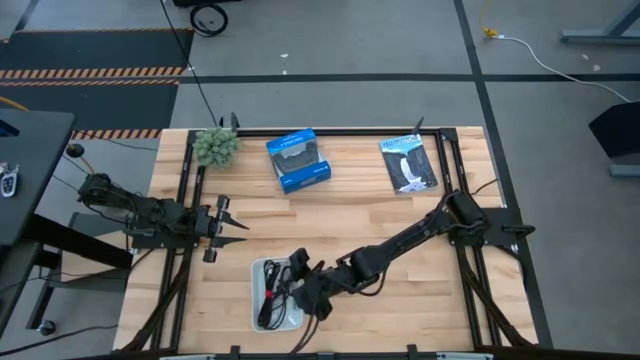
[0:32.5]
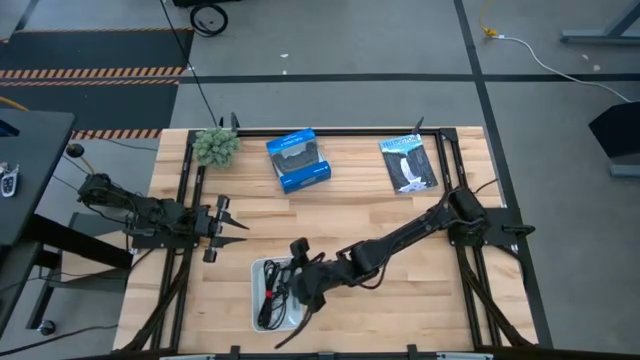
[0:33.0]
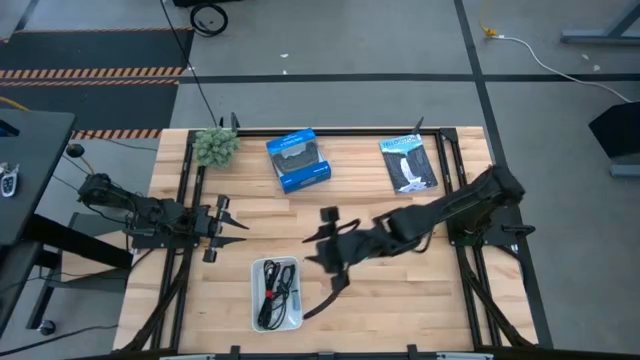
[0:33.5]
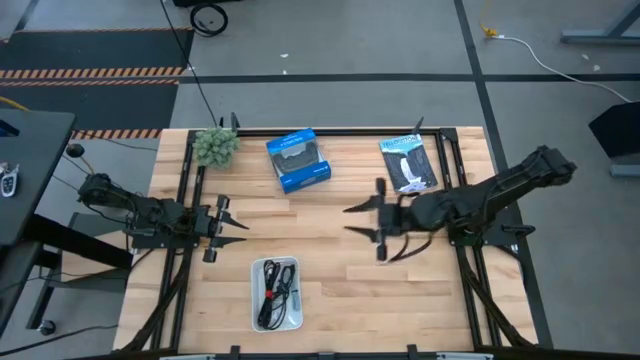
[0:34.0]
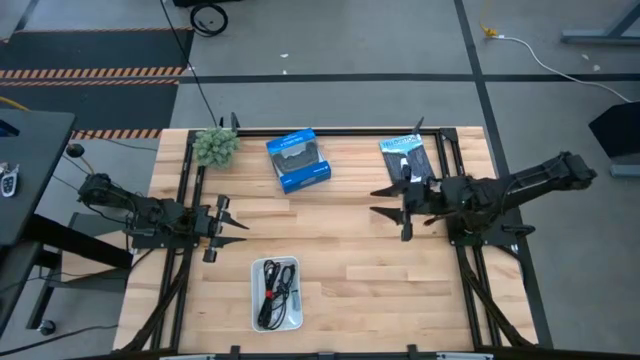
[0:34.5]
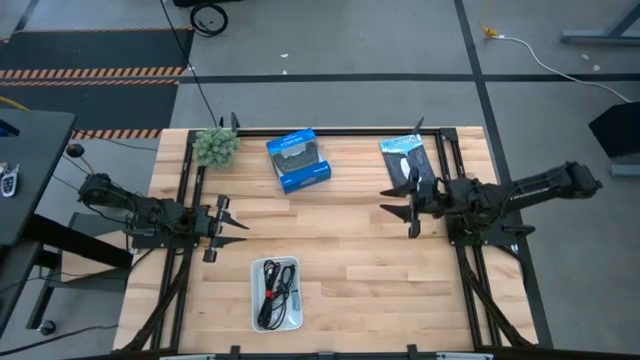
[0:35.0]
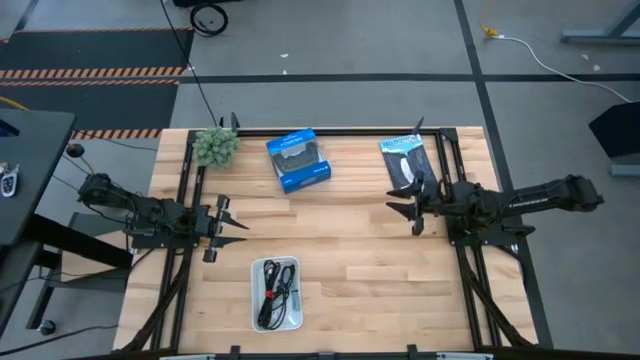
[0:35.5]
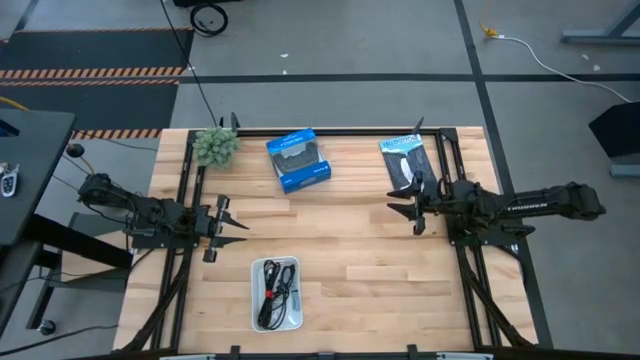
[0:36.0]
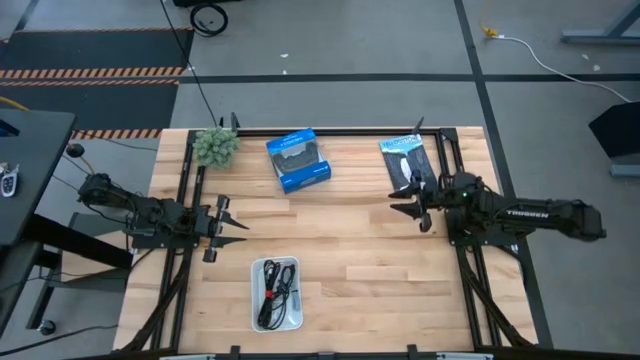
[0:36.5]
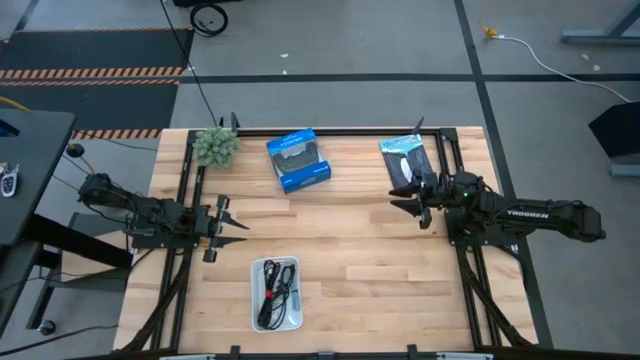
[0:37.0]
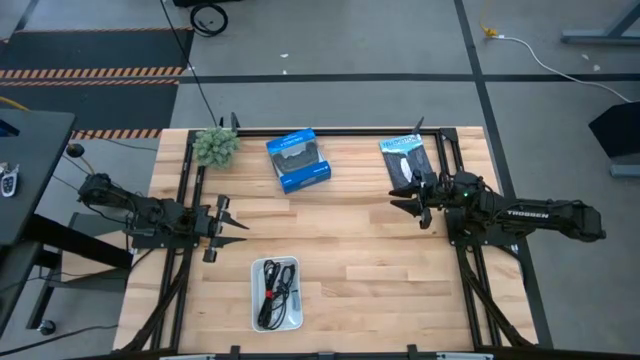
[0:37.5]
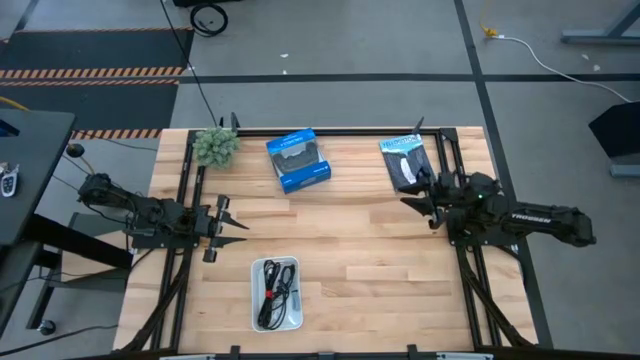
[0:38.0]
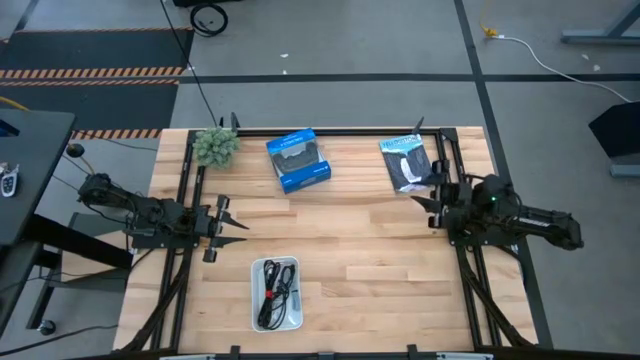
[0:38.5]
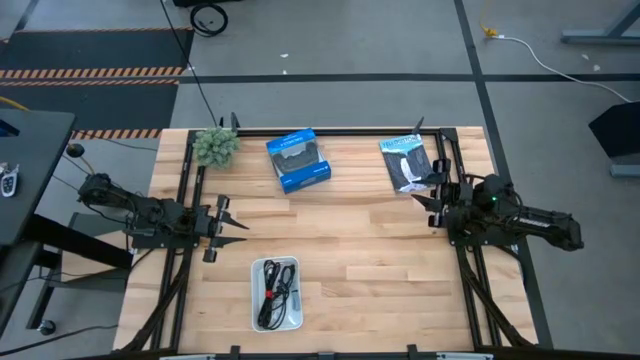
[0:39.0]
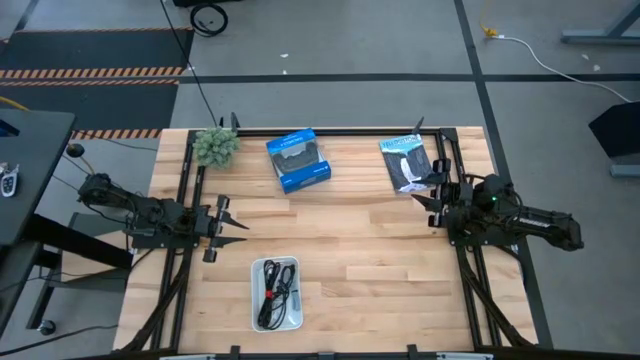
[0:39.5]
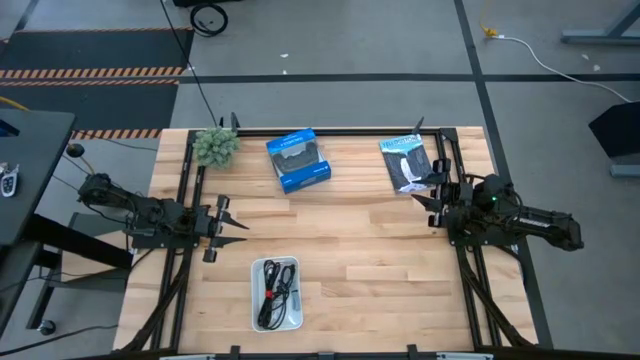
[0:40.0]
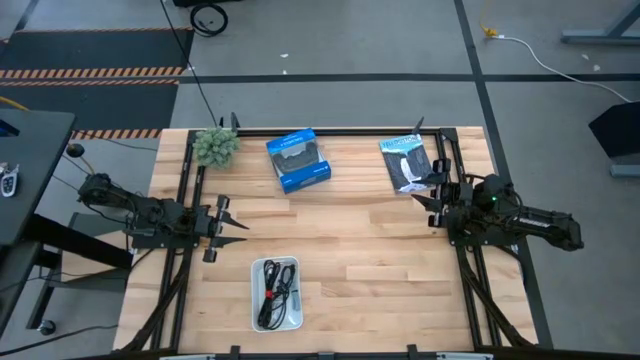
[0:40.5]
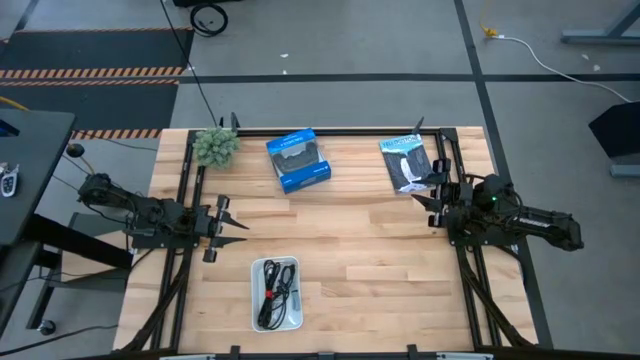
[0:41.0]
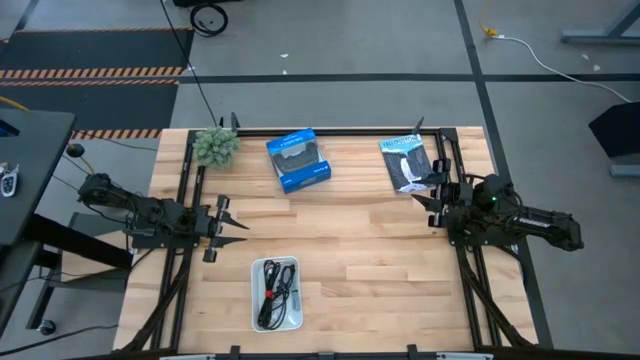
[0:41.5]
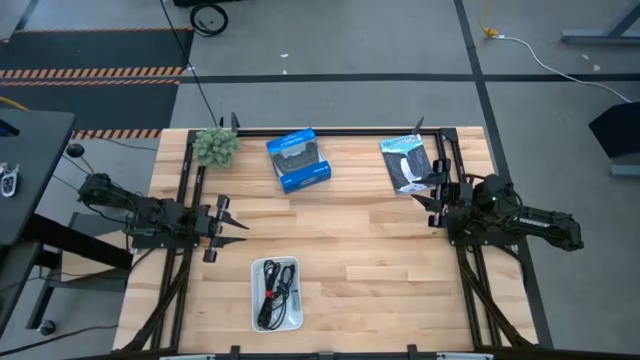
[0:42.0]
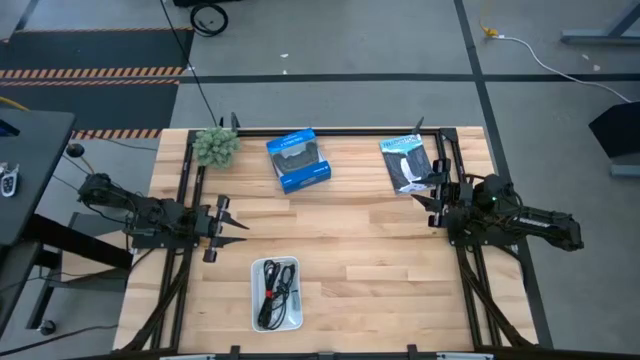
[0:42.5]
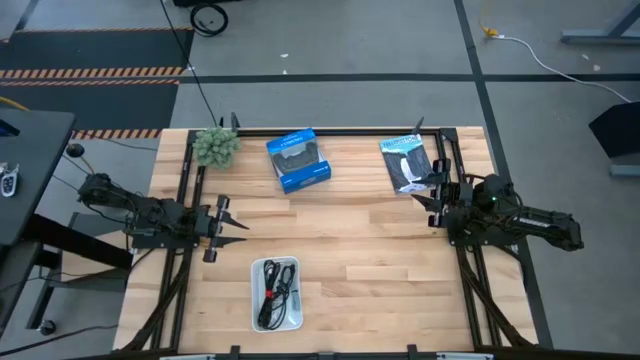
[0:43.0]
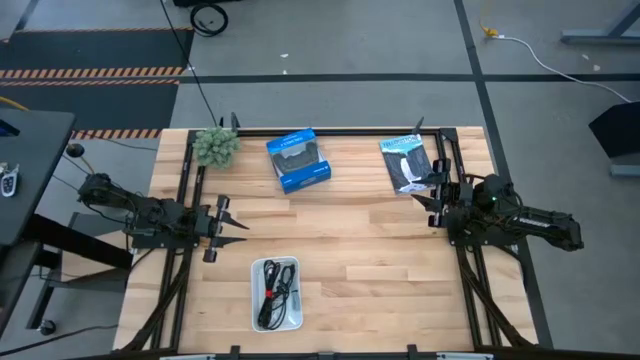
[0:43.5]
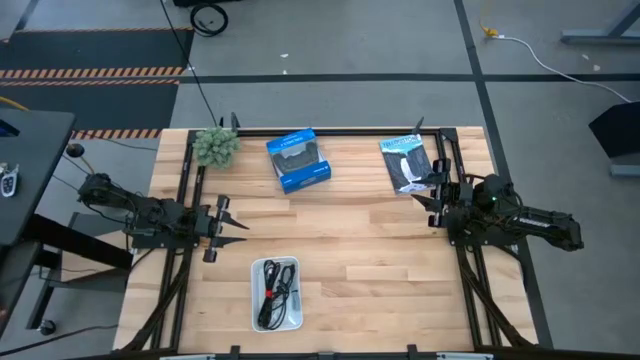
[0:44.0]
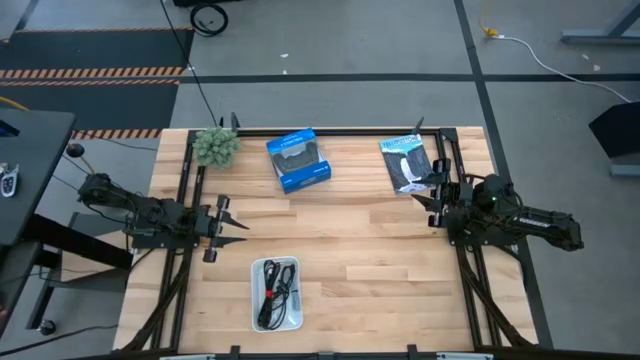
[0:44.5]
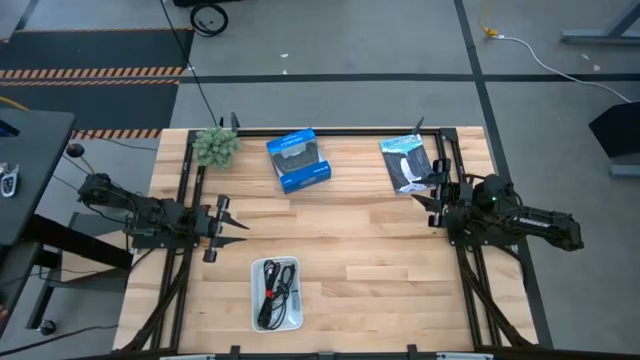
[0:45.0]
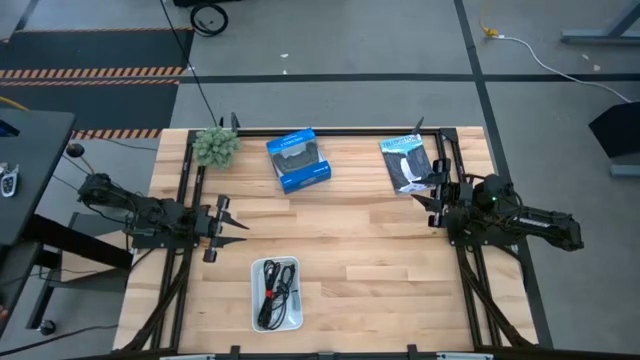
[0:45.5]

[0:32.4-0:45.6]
Task: Pick and place USB-C Cables
Return to Home Position

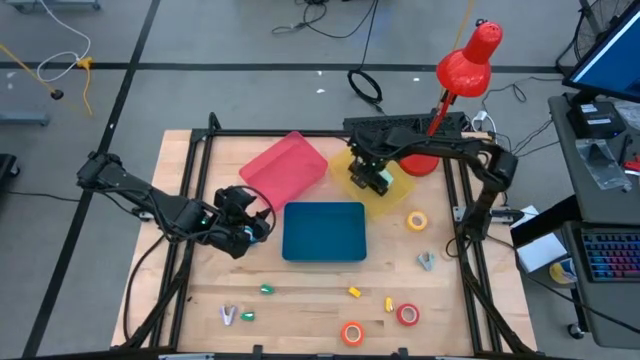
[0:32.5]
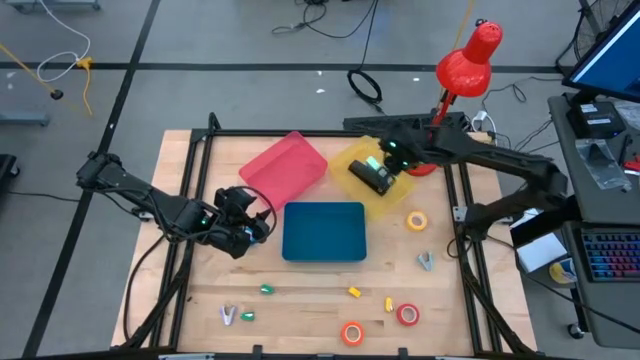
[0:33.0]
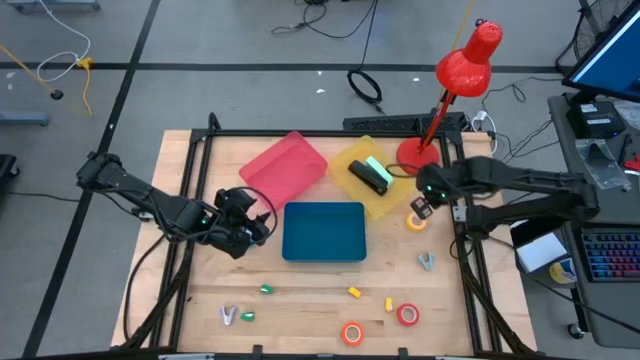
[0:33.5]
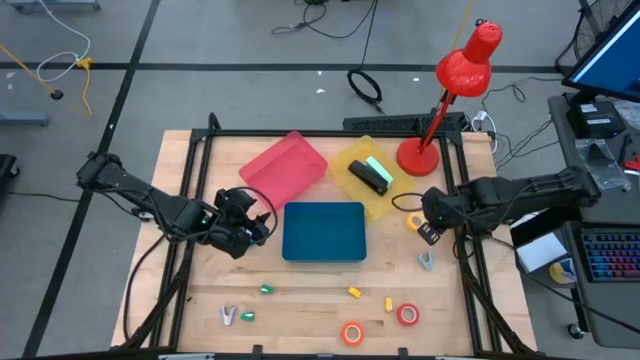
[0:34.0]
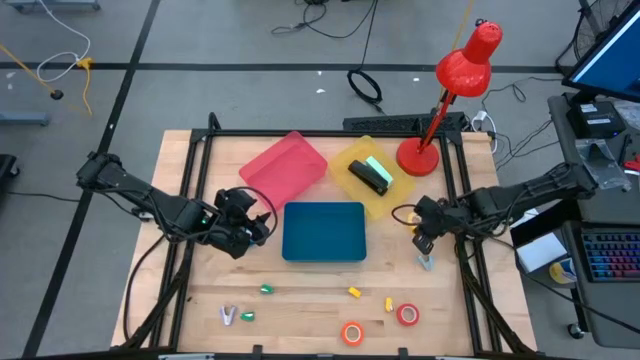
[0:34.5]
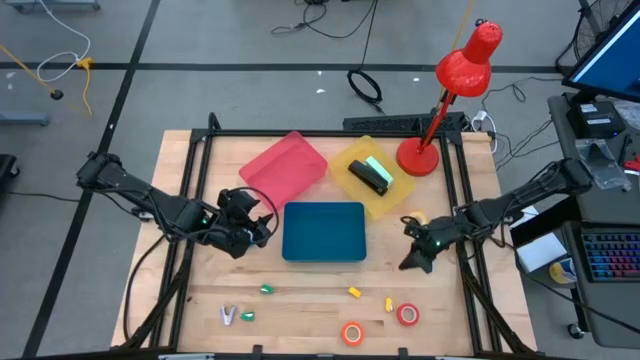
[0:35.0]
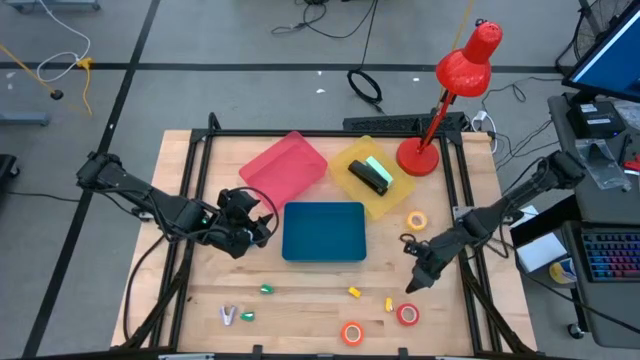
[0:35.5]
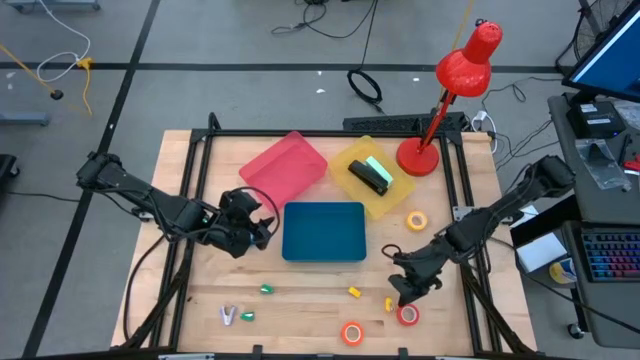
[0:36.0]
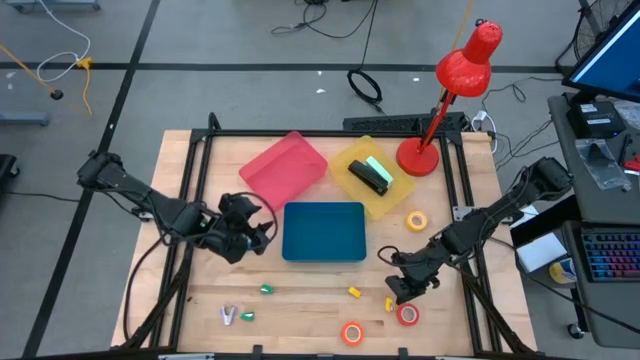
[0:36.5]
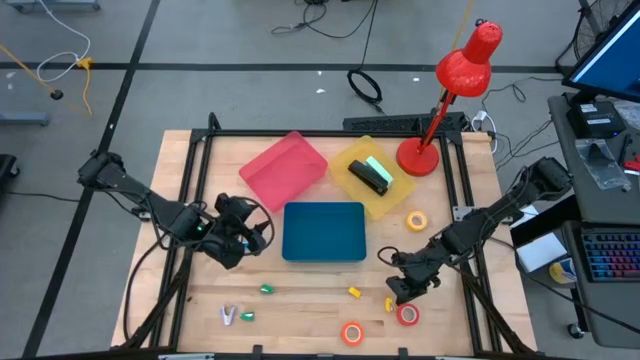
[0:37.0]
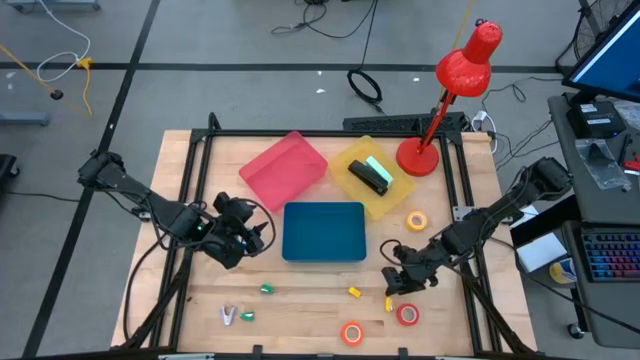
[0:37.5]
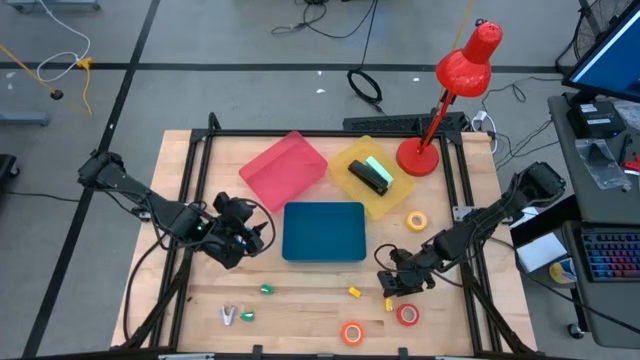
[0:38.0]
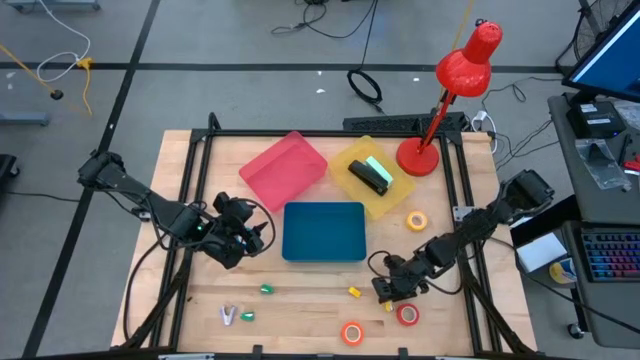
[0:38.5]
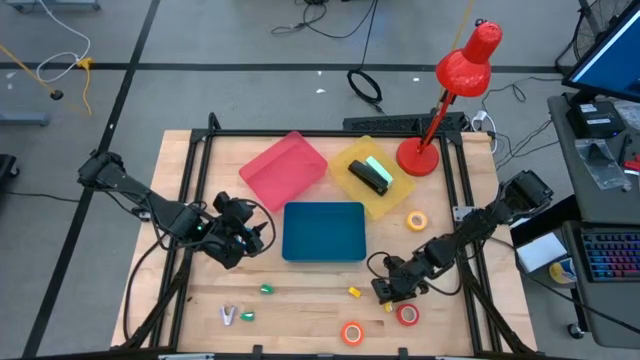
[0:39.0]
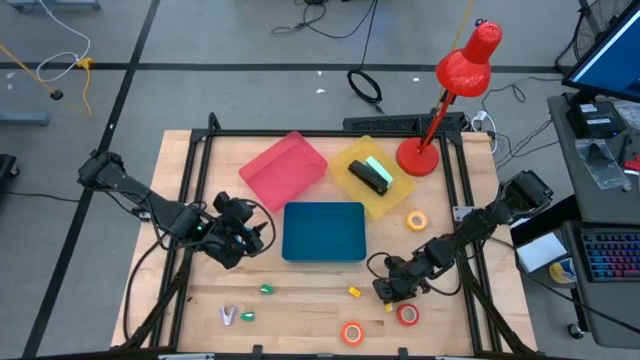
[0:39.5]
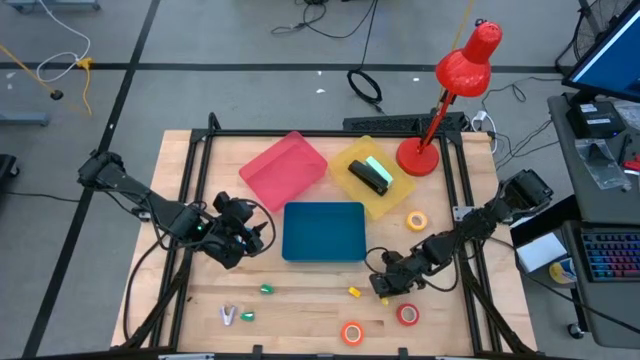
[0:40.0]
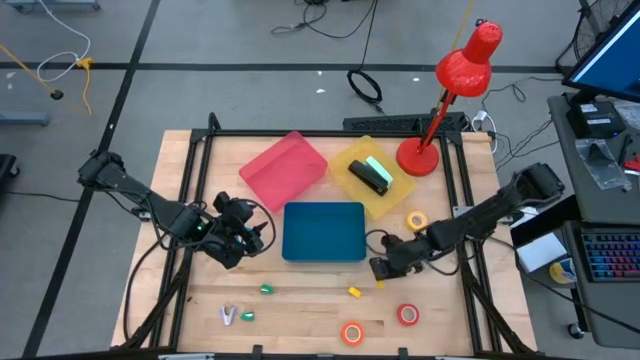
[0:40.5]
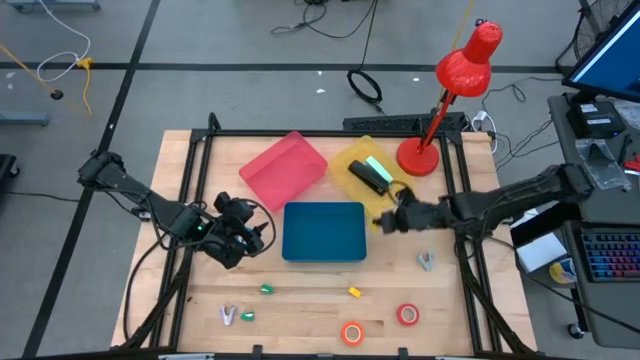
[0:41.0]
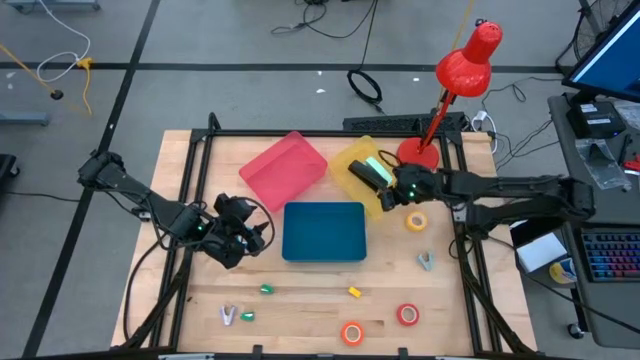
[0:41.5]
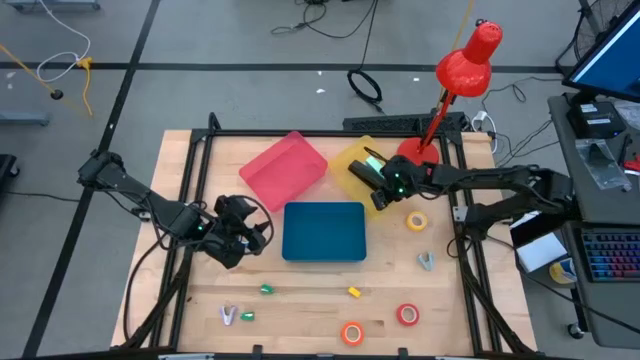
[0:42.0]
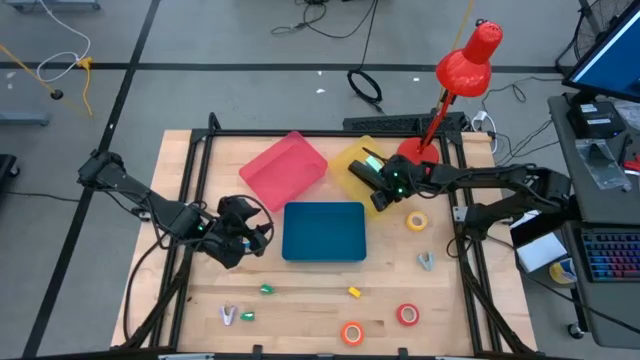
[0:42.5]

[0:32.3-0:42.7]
Task: Pick and place Stapler, Stapler remover, tape
Put the right yellow stapler into the yellow bin
